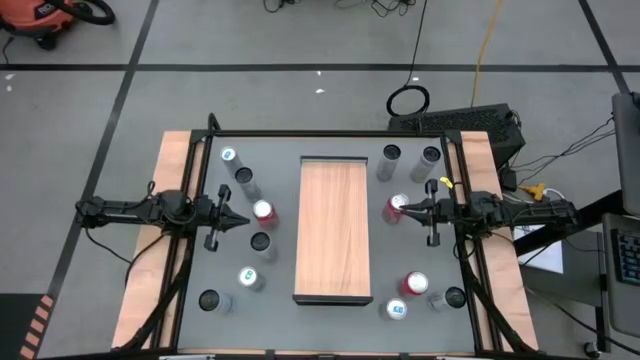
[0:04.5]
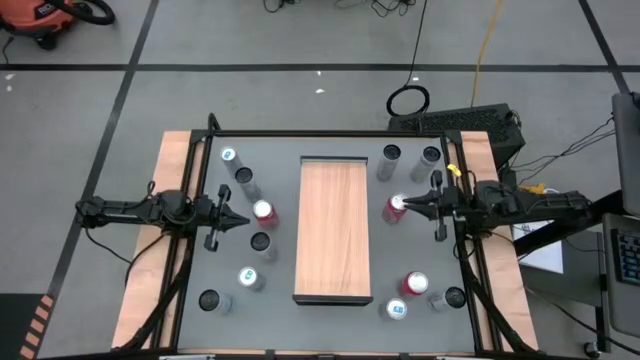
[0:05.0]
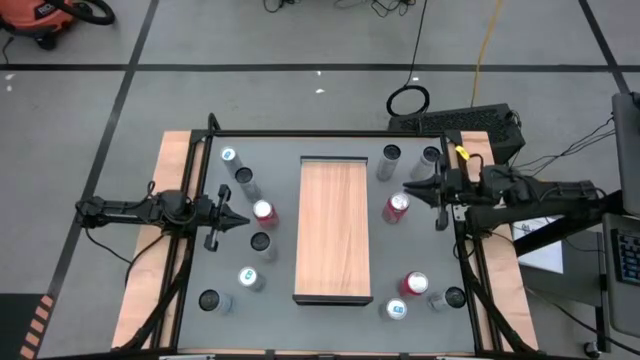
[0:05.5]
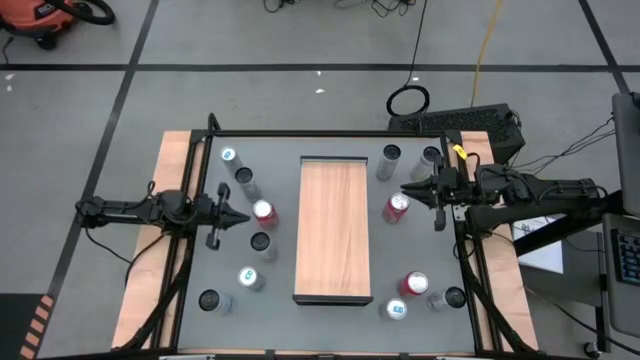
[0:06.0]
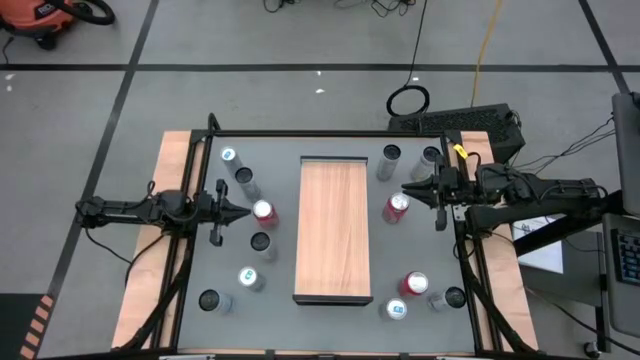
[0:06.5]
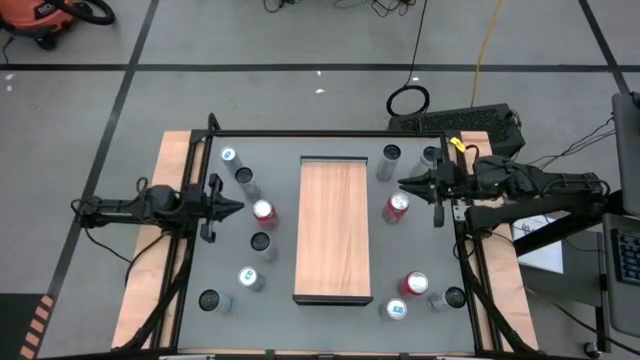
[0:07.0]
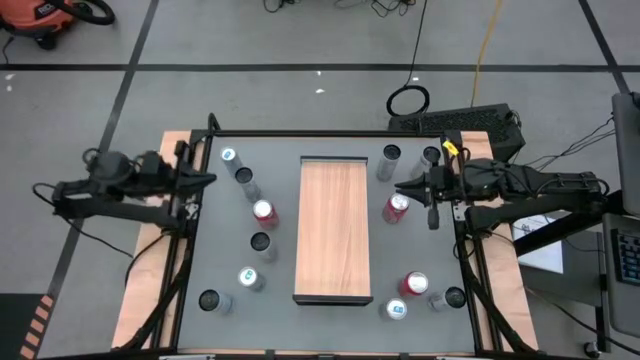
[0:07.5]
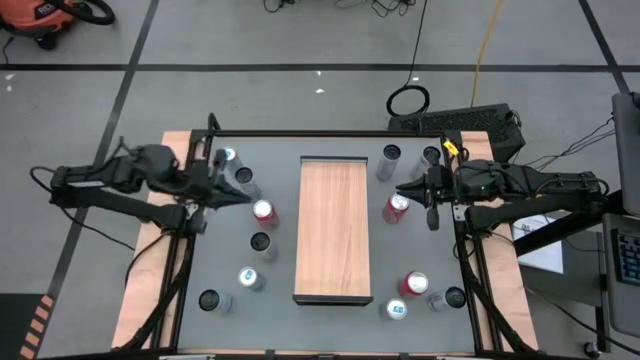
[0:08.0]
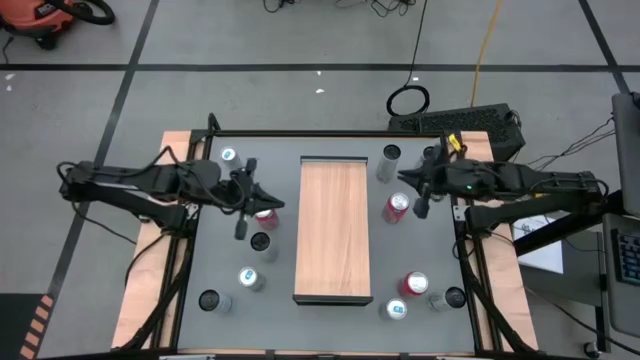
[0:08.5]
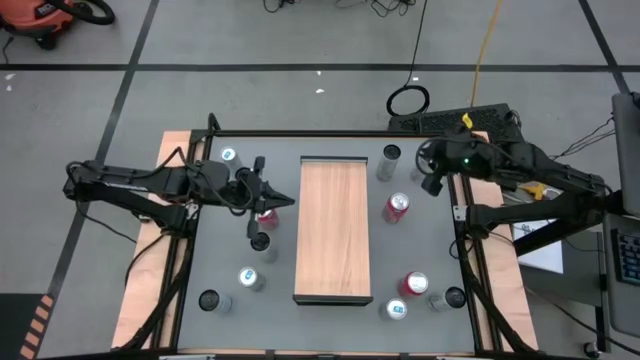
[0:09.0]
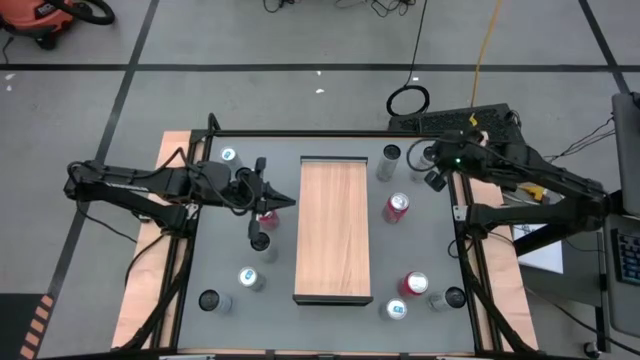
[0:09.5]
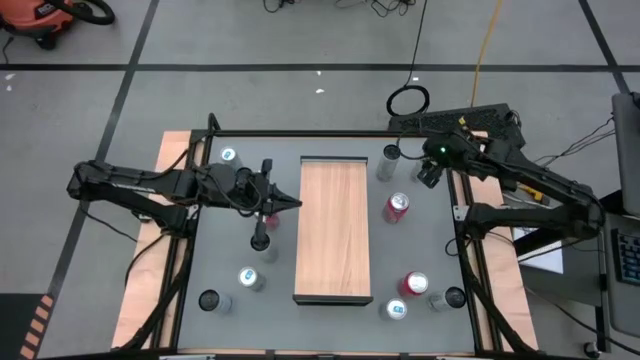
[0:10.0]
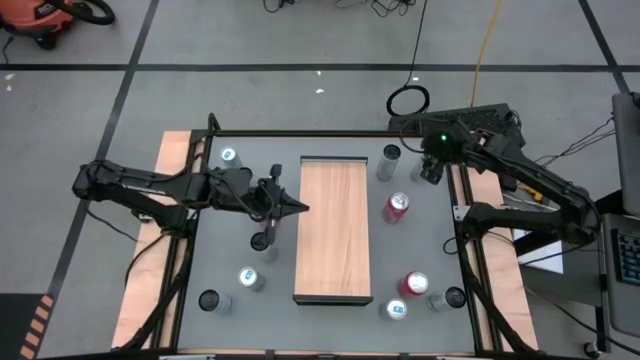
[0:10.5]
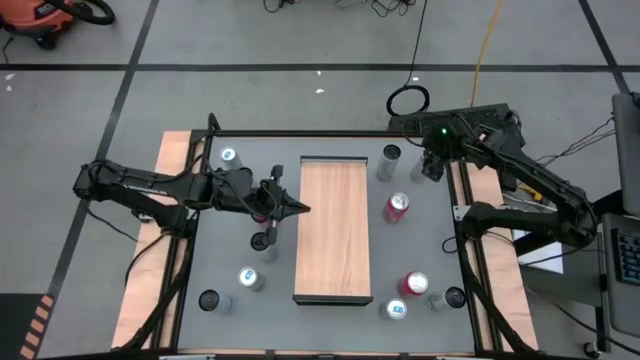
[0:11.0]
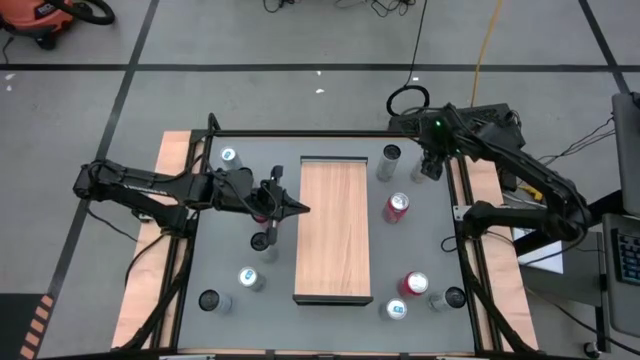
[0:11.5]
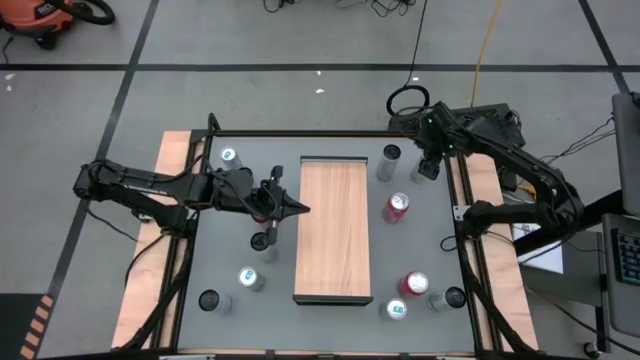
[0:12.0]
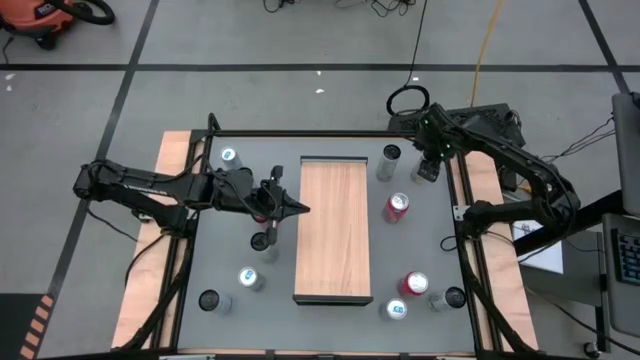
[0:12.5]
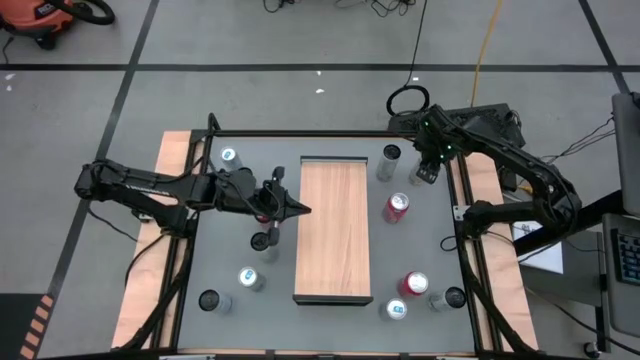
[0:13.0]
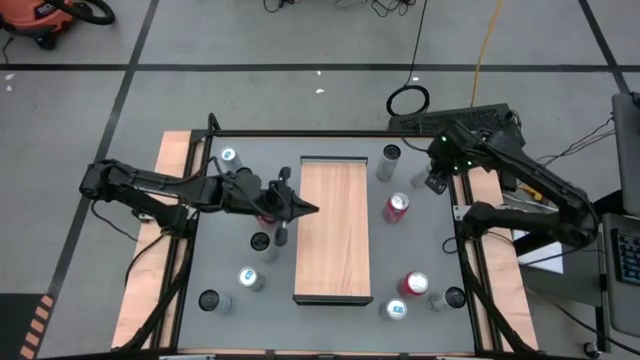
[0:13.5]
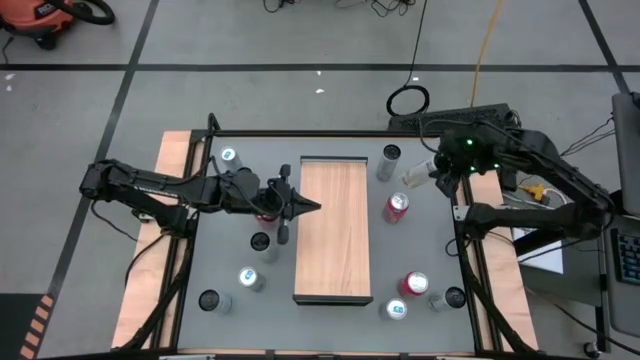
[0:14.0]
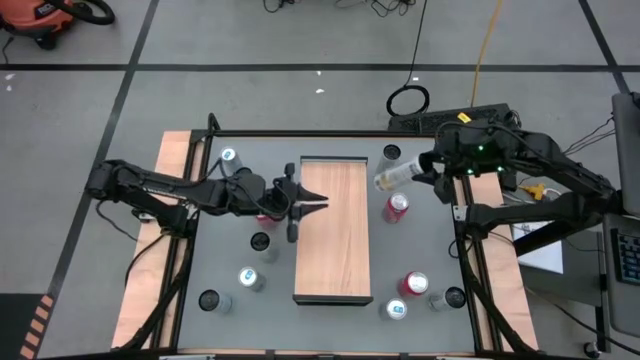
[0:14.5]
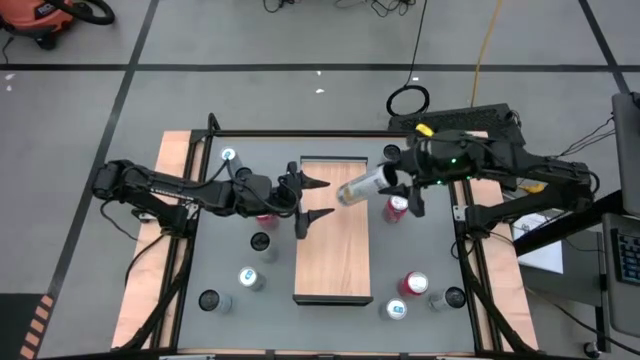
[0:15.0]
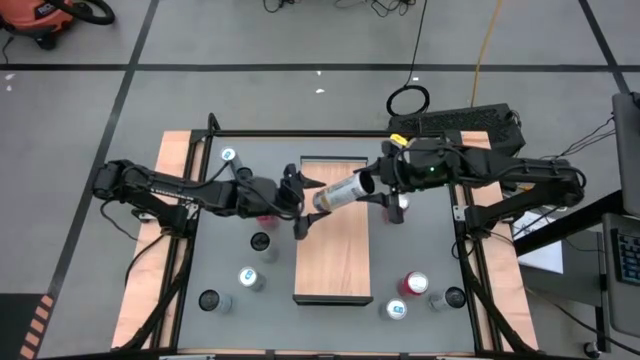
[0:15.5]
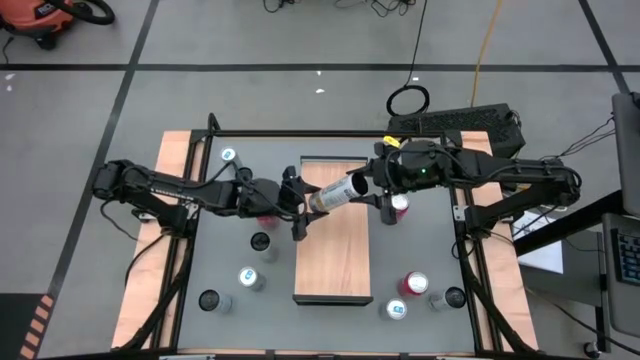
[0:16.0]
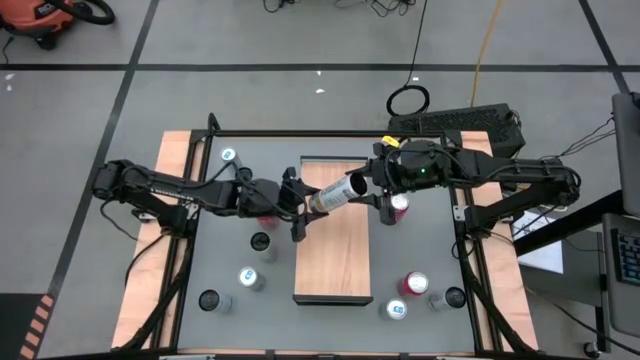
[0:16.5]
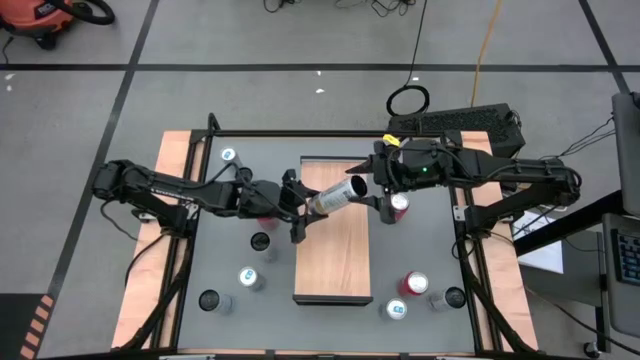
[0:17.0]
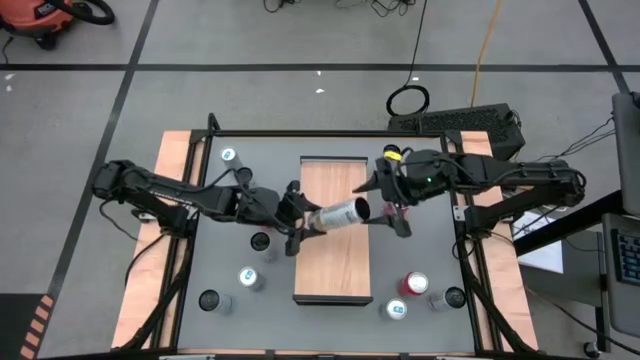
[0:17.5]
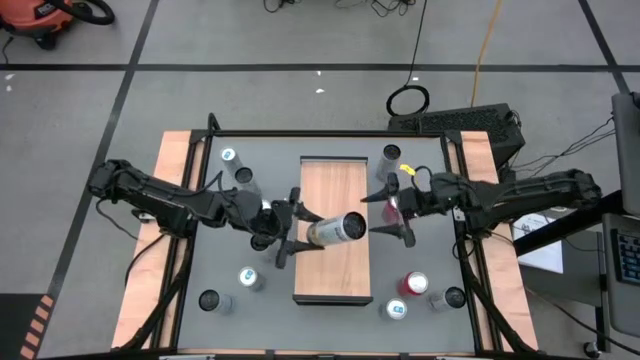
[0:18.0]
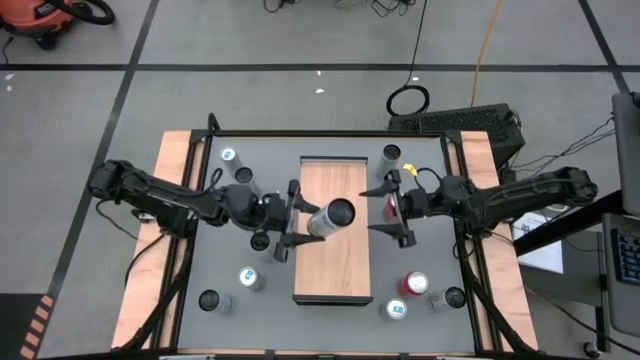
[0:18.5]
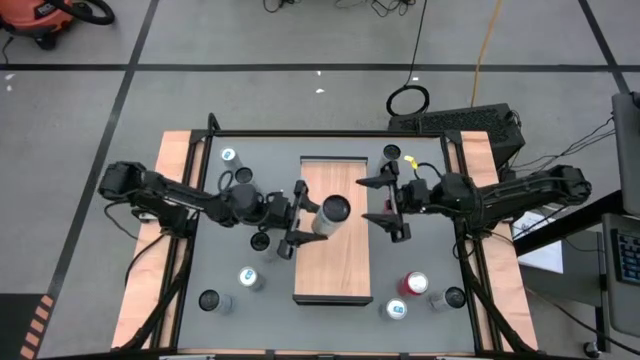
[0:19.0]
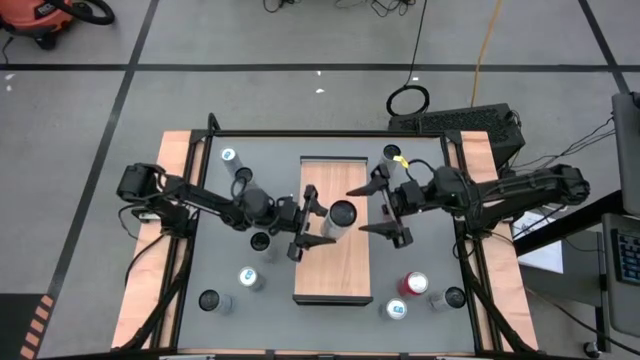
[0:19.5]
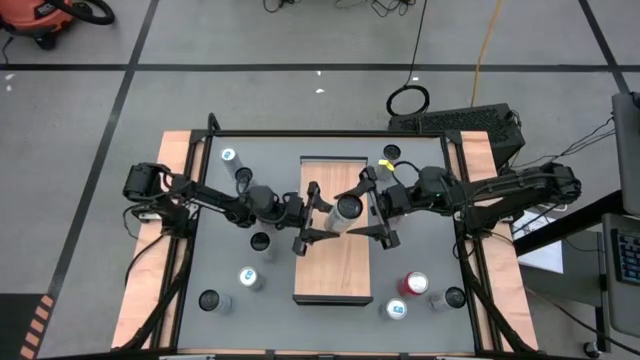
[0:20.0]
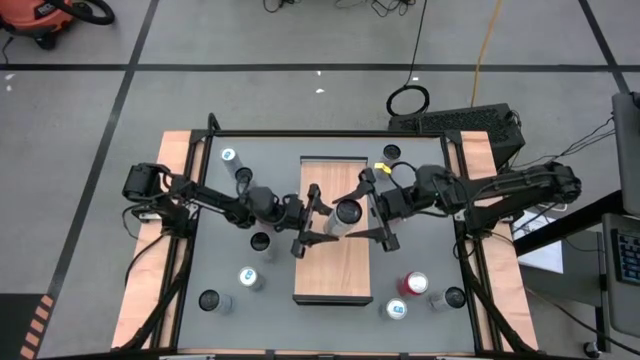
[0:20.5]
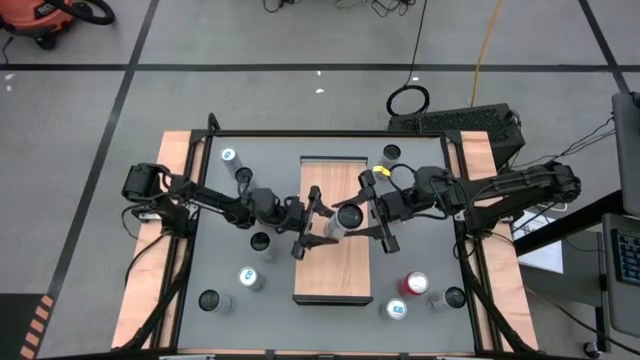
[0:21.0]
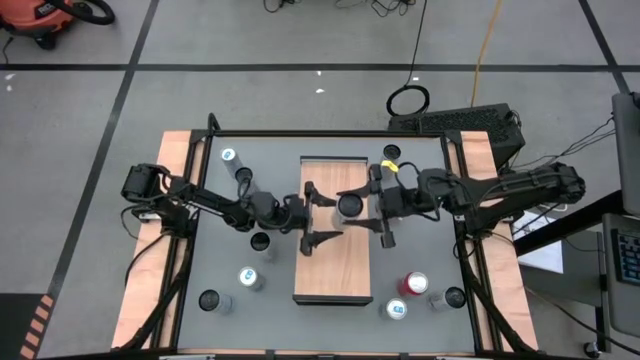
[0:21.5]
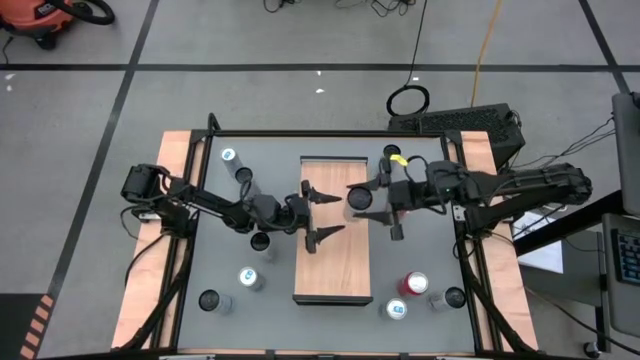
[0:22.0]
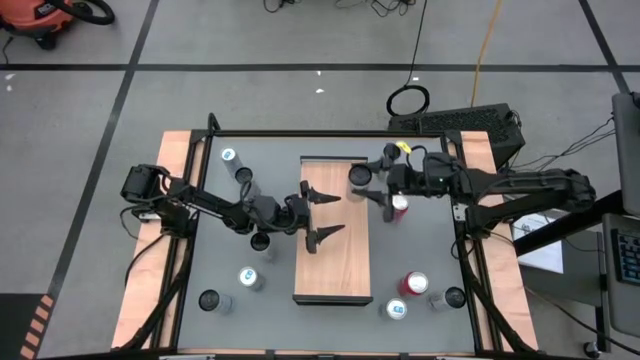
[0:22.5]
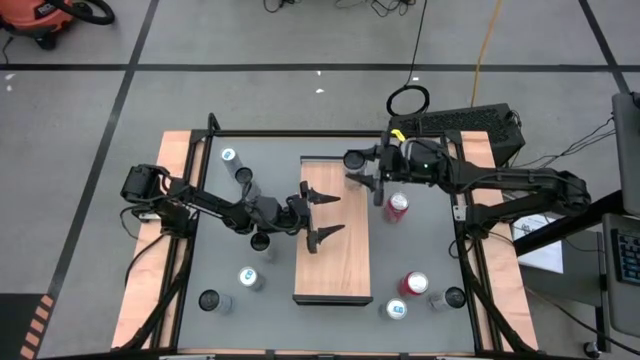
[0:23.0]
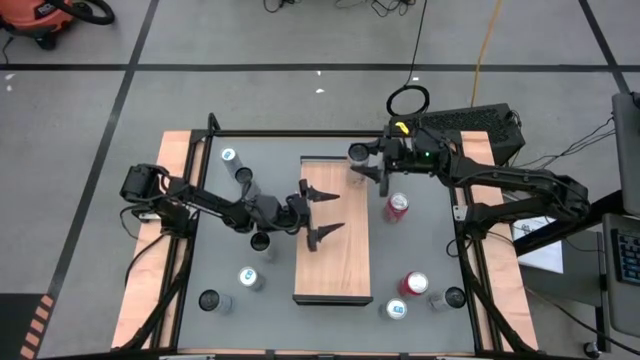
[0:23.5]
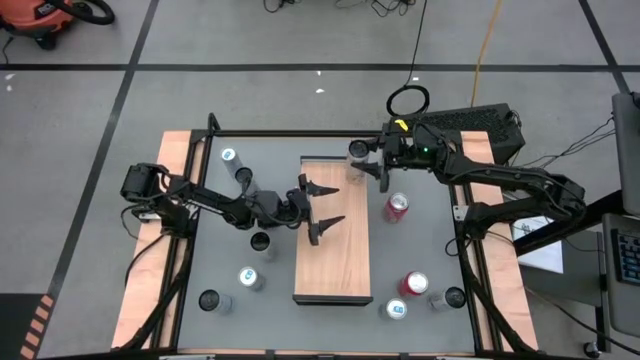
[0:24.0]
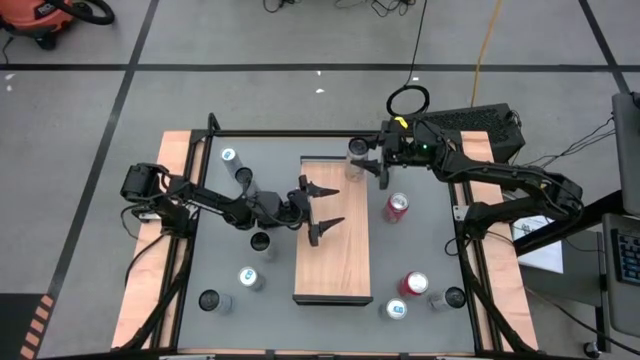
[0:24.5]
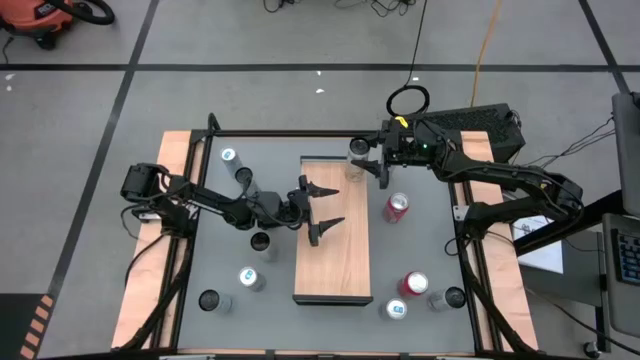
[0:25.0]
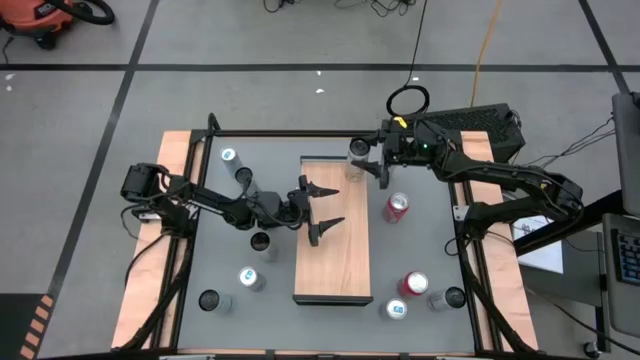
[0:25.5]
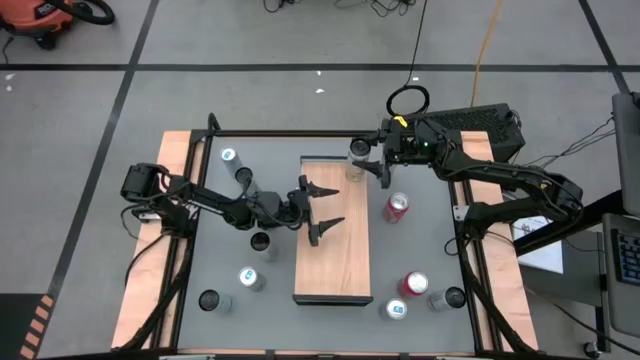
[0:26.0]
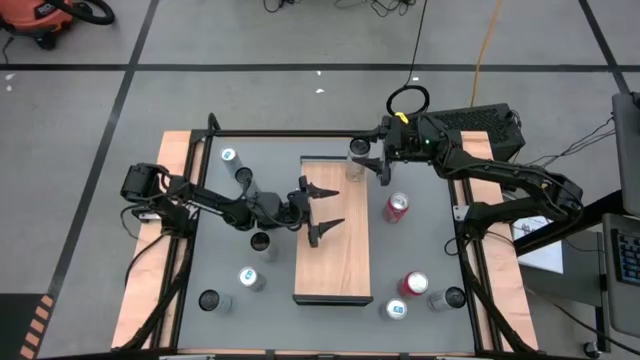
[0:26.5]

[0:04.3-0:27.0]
Task: Place canned beverage on shelf
Put the top right white yellow soda can on the shelf
